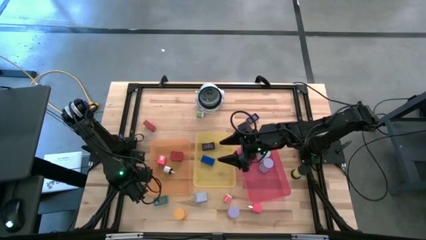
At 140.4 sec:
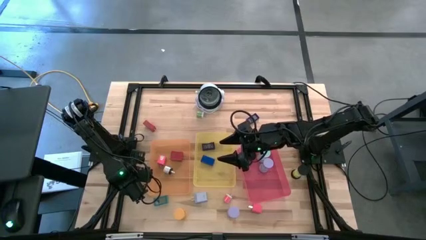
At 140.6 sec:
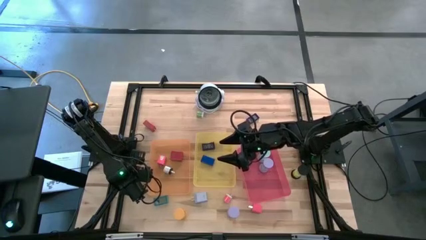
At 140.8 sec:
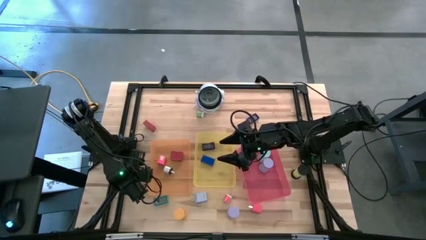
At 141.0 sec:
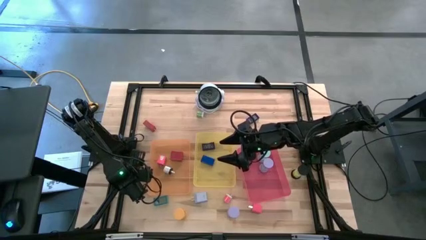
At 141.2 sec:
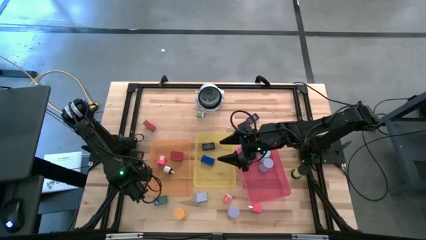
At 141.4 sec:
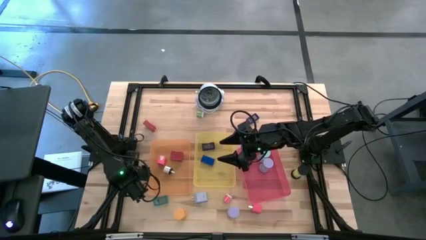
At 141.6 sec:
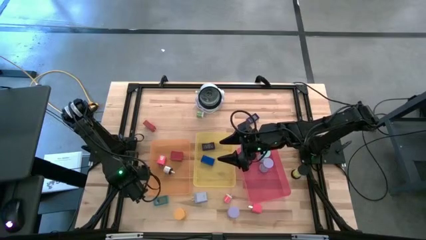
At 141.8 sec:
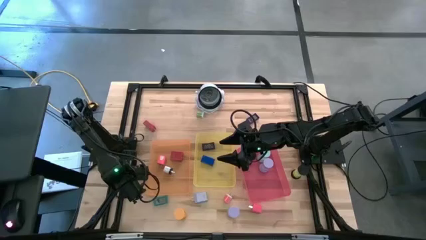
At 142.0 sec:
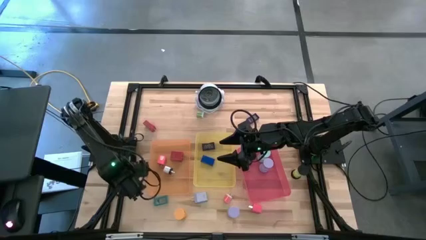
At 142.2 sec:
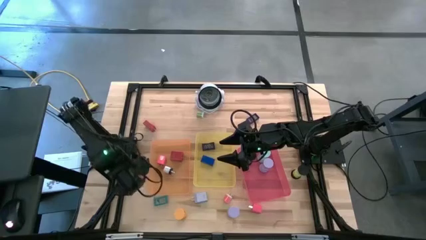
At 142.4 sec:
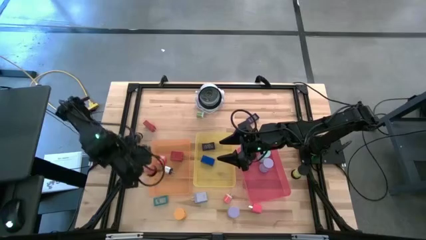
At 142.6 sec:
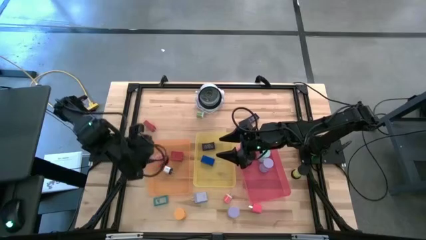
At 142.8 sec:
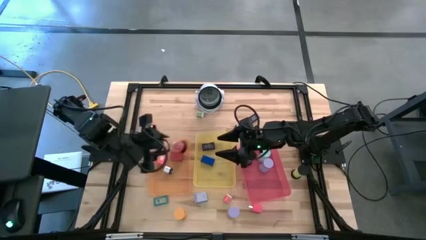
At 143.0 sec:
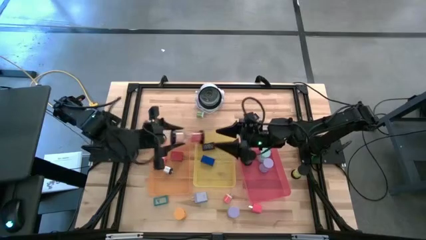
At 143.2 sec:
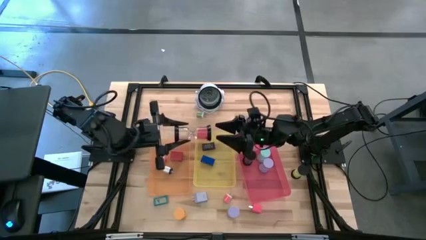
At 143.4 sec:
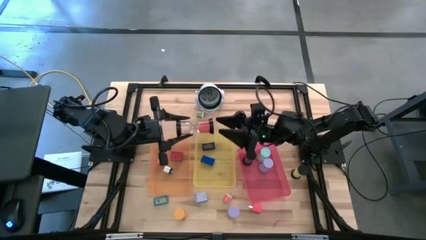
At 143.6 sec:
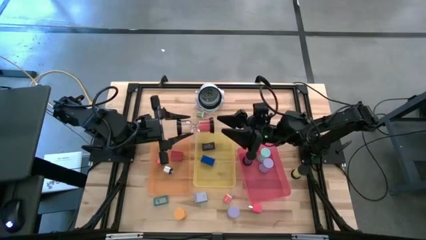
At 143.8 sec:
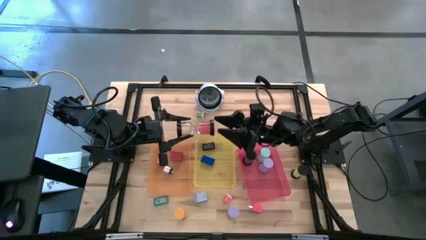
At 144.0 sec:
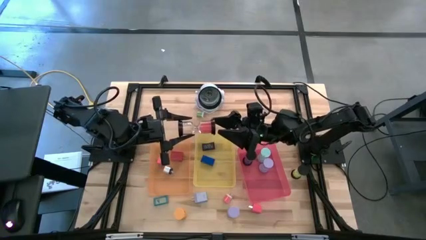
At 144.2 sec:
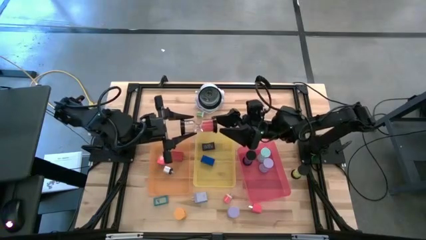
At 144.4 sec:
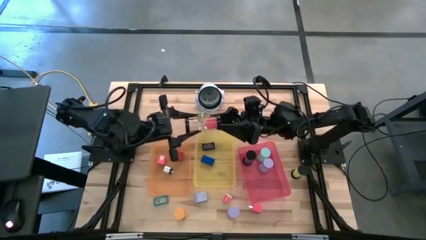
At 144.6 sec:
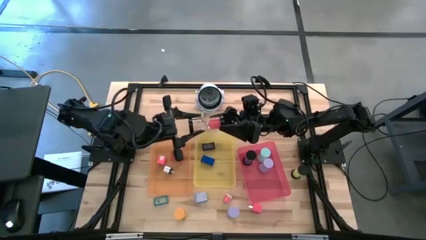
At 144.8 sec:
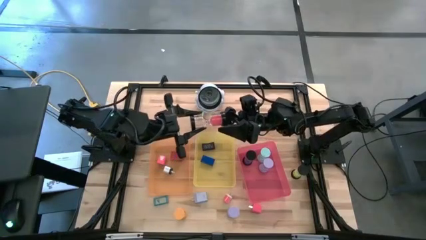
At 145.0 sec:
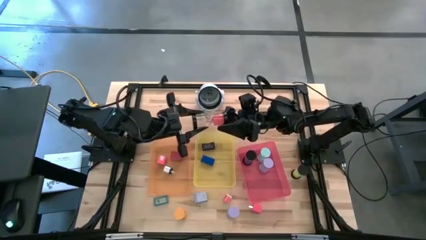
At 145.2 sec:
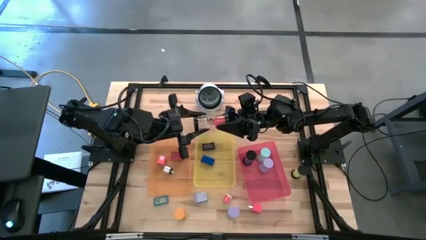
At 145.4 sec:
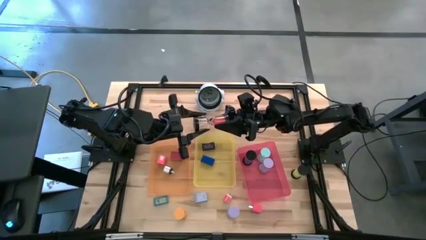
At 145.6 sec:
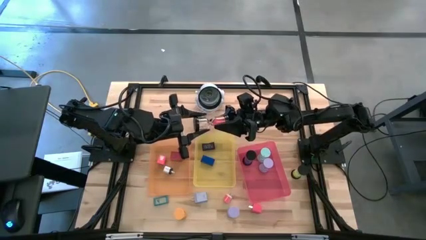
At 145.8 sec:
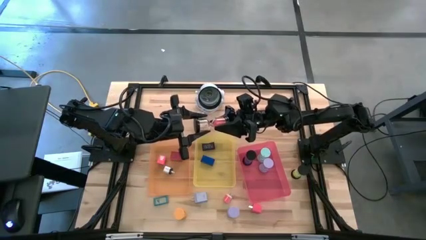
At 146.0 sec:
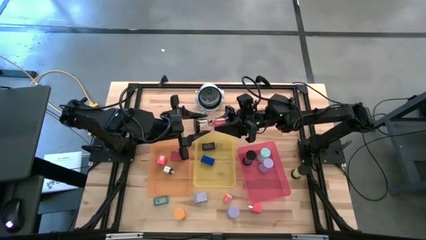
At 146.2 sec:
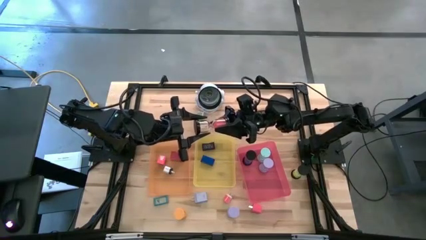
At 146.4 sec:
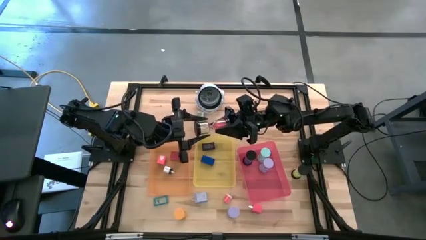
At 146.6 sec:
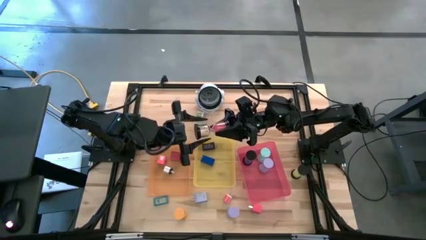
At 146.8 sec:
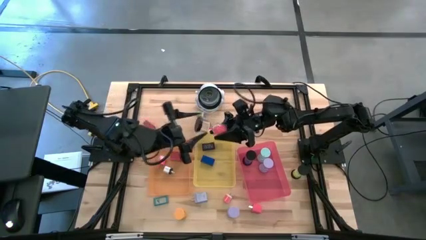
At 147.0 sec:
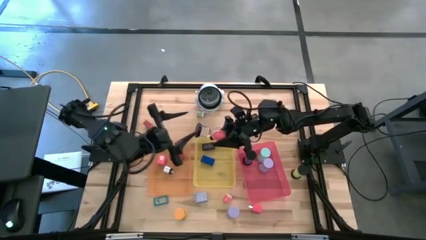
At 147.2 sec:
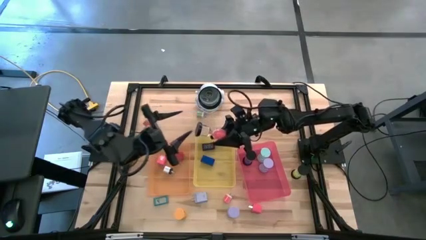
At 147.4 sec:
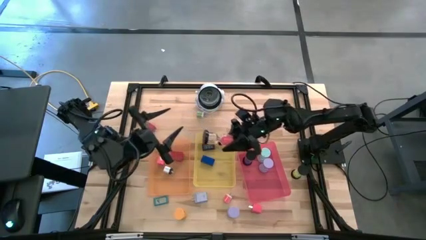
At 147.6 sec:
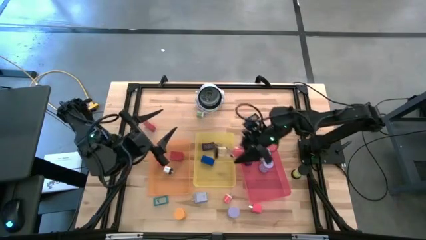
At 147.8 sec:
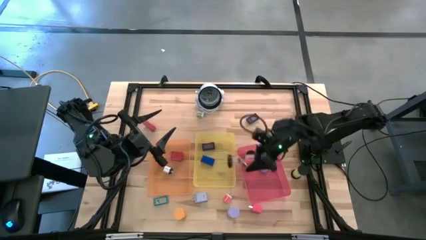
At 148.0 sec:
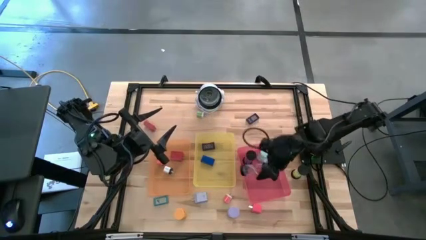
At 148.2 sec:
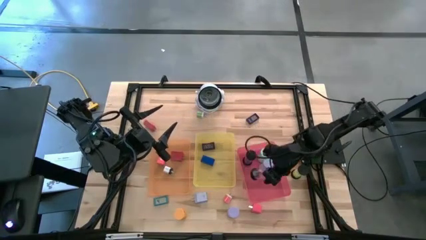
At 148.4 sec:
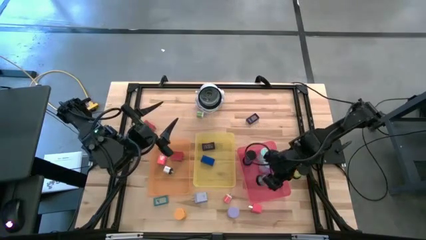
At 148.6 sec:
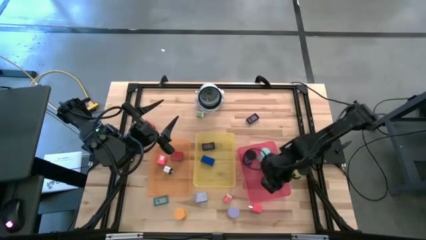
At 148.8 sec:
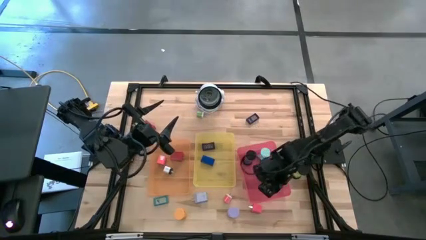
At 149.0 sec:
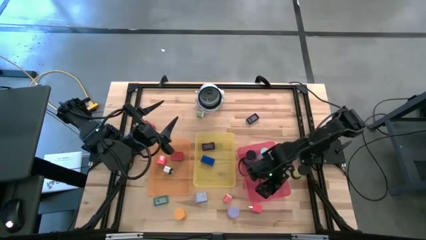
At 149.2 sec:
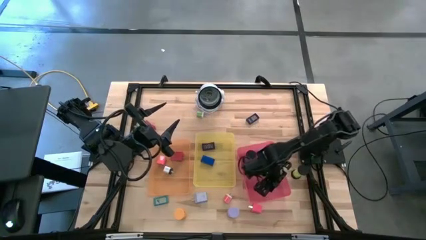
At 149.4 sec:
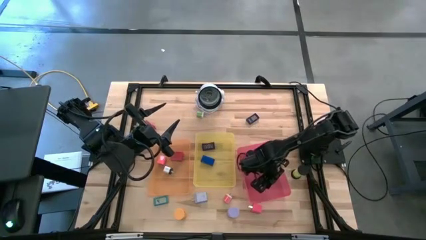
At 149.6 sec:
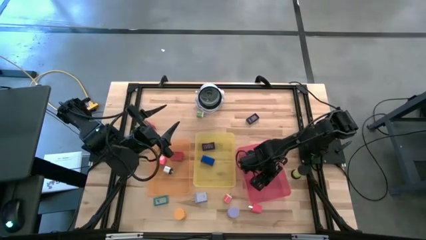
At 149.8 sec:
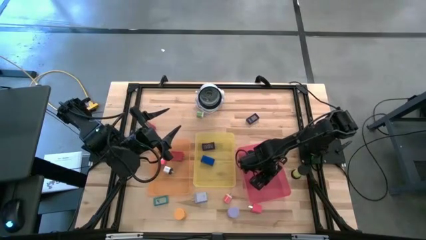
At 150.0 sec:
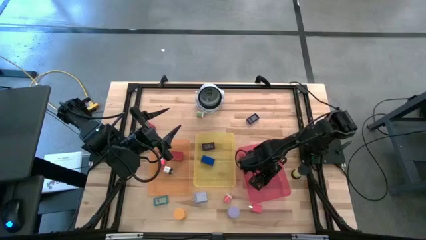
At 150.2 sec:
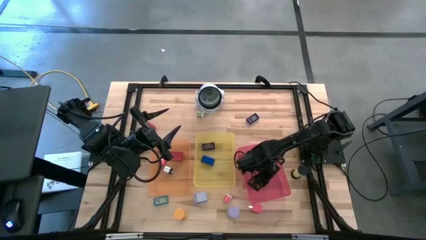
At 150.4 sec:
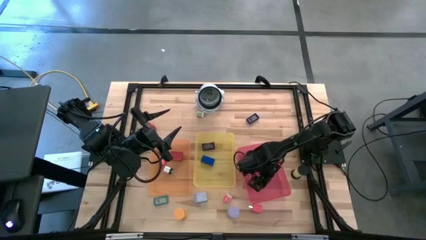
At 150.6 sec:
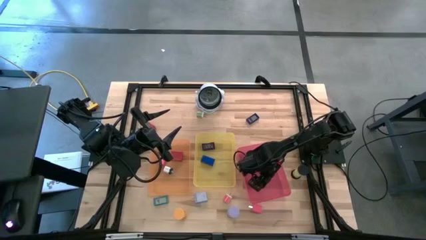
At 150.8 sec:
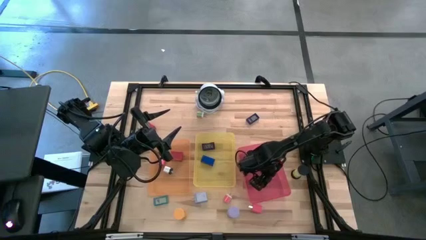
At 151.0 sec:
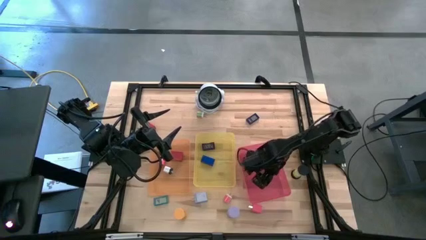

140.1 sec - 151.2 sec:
Task: Pick & Place Office items
Put the black hourglass timer into the red bin
